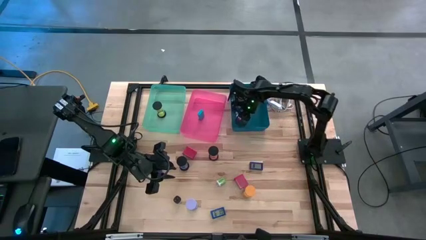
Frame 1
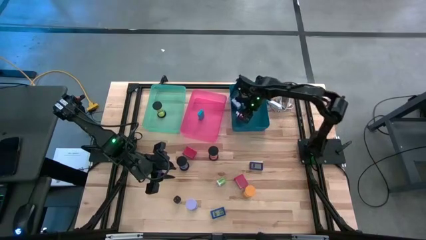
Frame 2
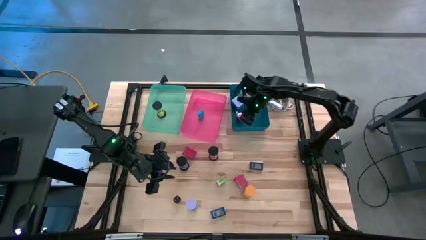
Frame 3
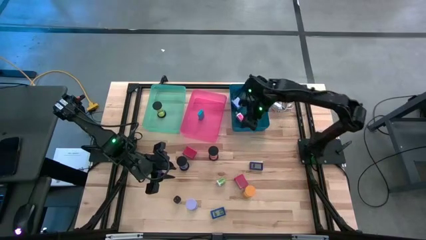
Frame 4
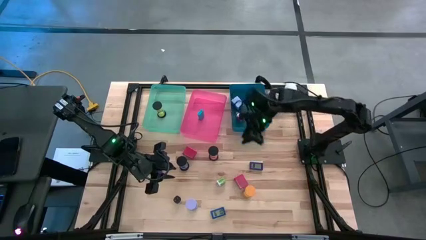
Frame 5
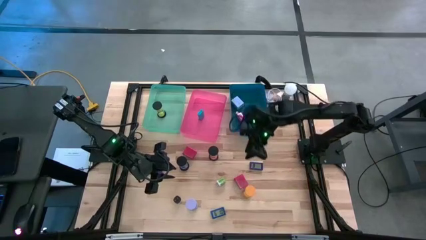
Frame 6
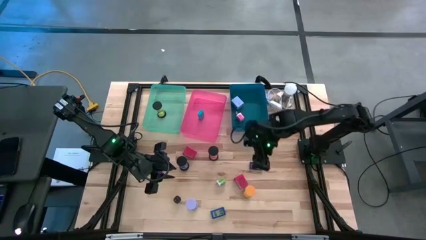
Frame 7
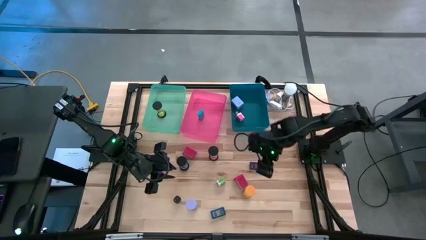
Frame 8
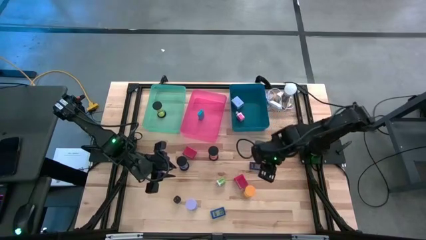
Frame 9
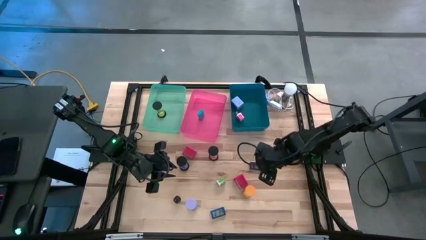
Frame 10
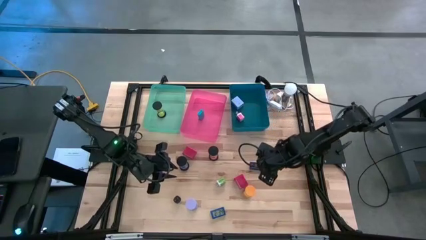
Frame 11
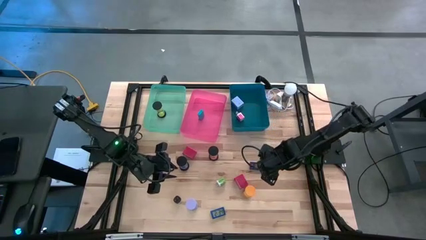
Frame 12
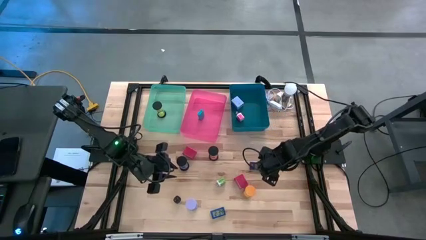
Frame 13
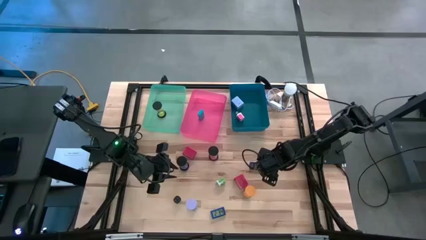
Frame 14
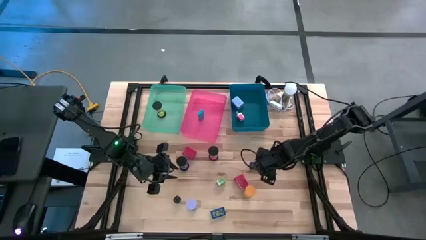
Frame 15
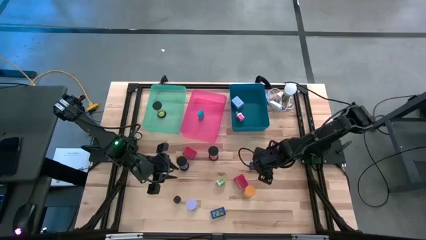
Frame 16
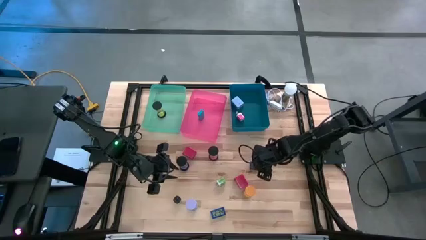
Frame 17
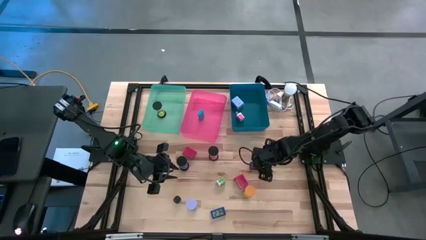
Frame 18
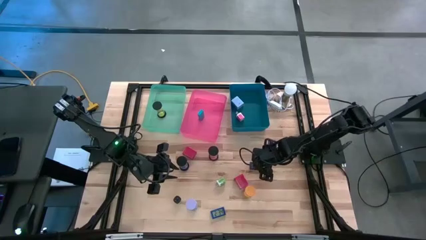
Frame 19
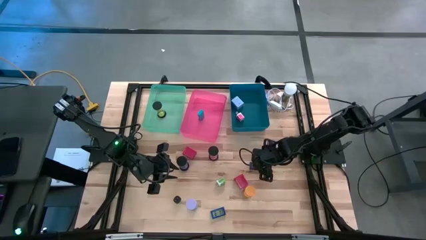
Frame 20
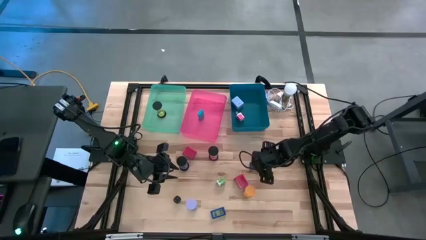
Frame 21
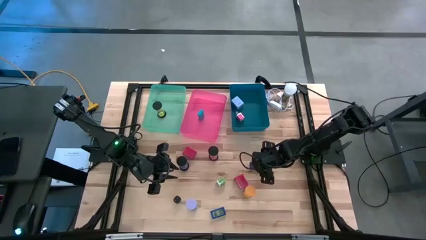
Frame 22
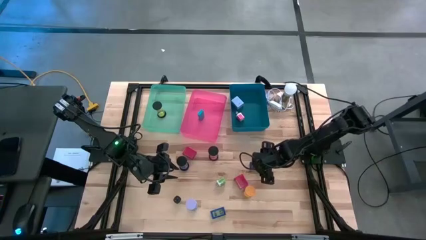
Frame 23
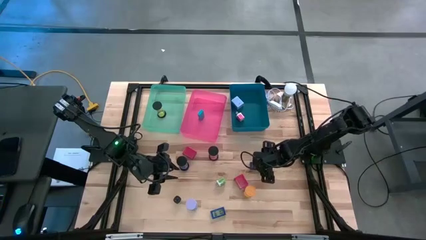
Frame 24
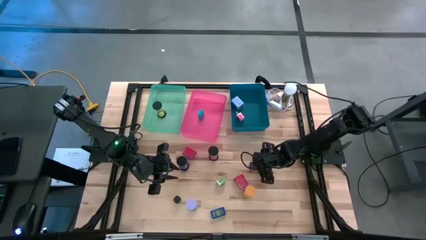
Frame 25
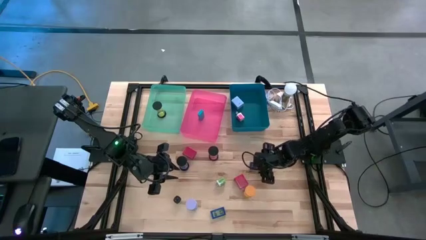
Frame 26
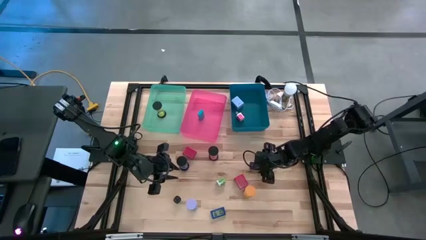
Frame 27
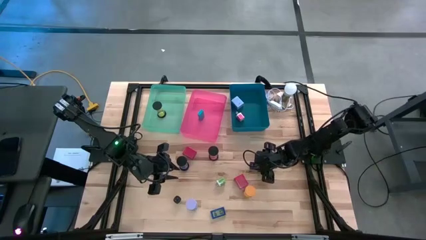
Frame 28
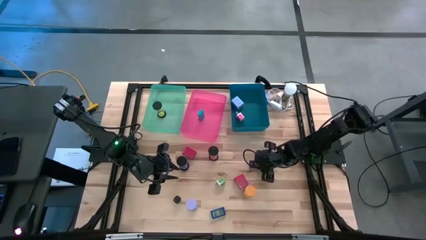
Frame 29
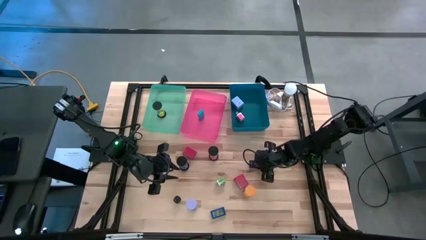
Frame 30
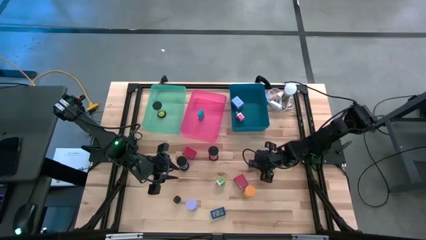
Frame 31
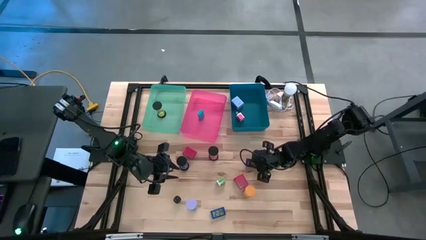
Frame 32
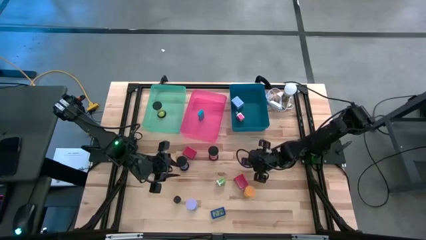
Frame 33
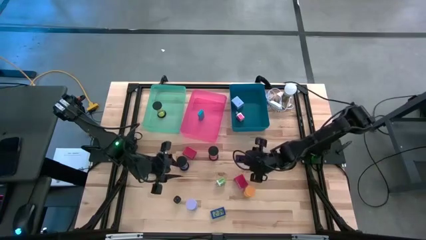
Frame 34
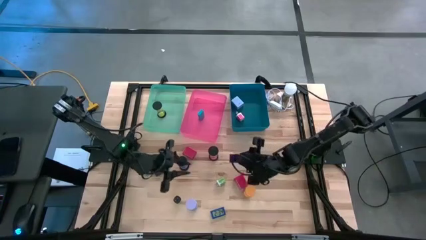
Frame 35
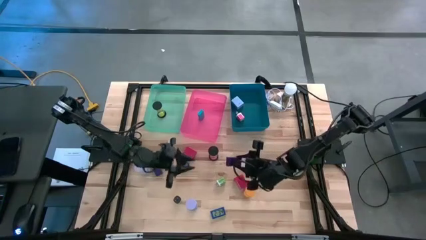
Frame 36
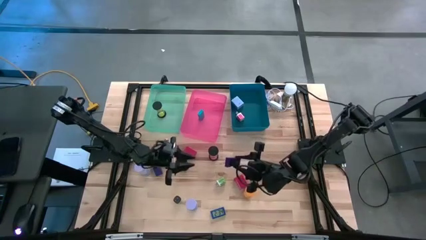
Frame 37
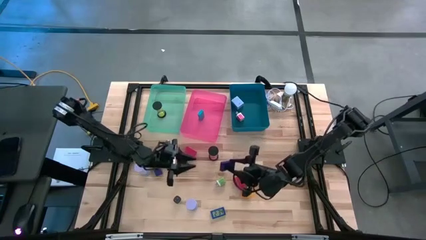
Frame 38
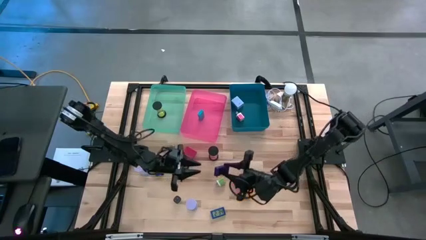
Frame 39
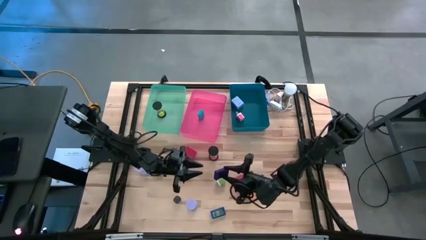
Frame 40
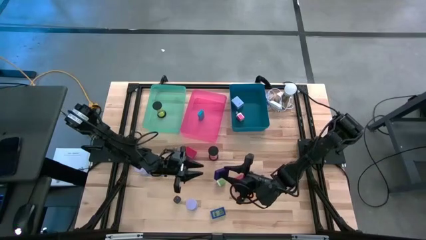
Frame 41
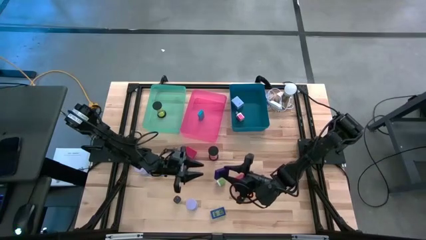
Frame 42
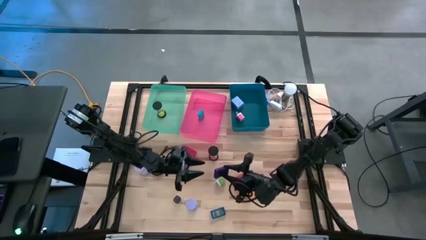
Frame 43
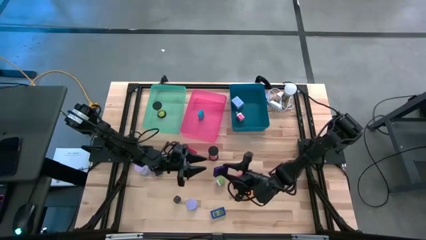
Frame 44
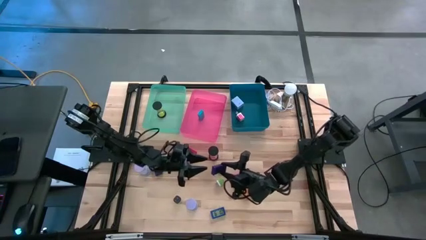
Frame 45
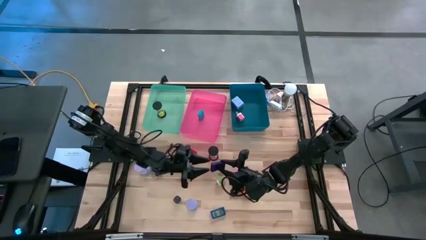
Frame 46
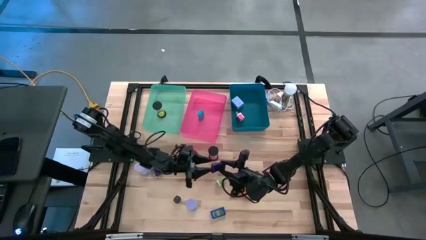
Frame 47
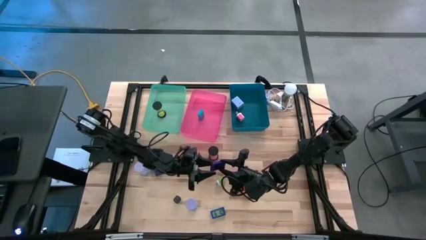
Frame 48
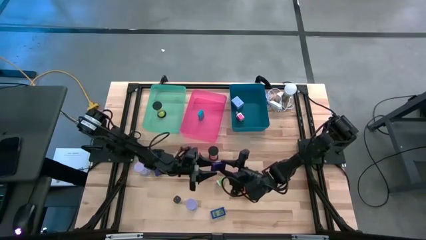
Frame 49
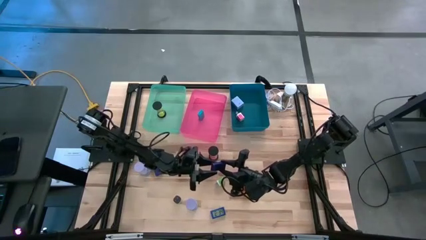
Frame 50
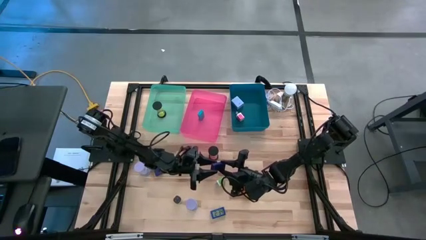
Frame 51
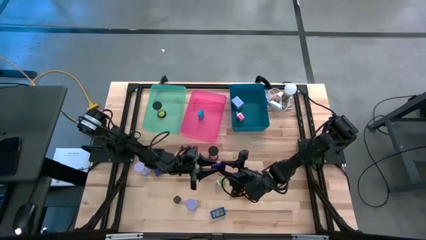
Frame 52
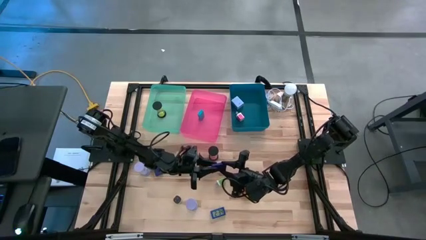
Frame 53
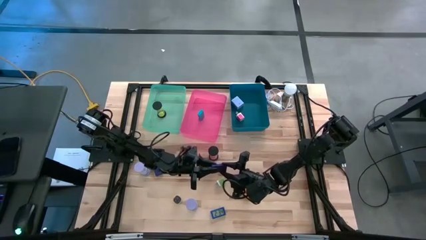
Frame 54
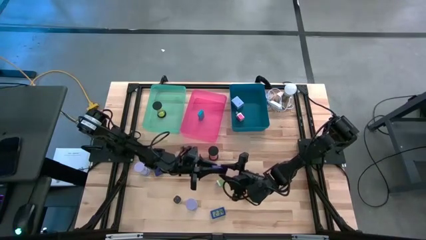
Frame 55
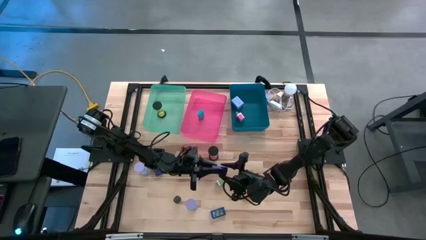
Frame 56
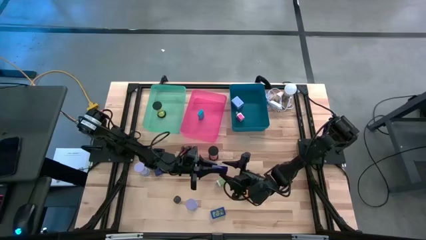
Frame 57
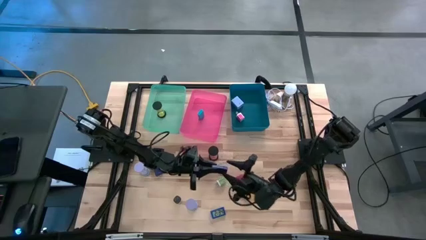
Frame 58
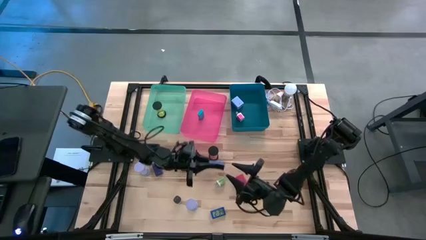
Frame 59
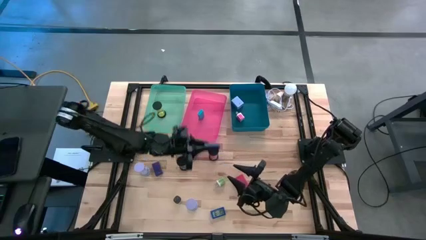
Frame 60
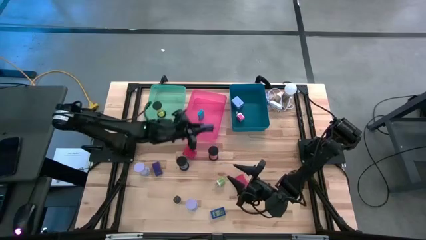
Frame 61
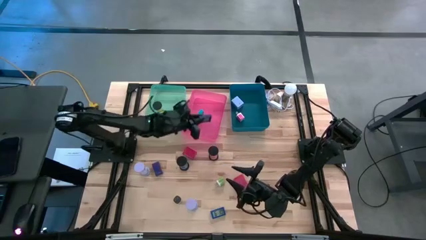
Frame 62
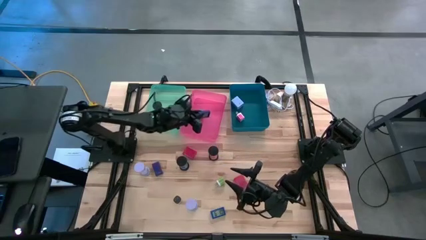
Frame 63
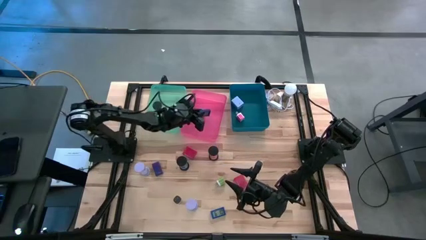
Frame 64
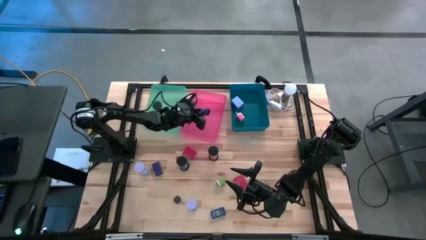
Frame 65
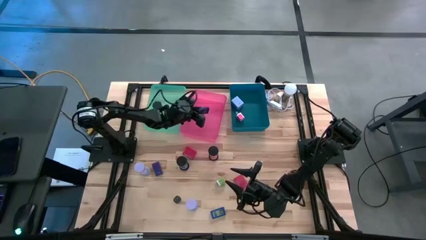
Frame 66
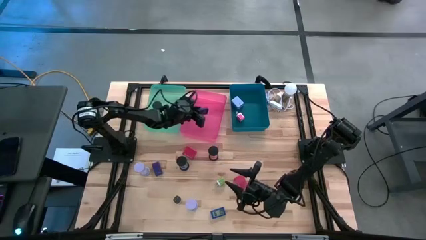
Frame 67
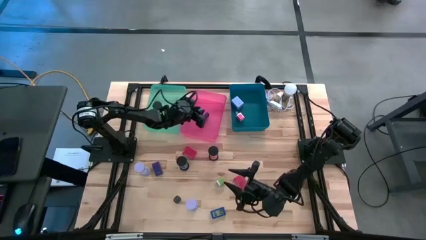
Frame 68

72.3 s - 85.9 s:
Task: Pick & Place Office items
Put the right purple digital clock into the pink bin
